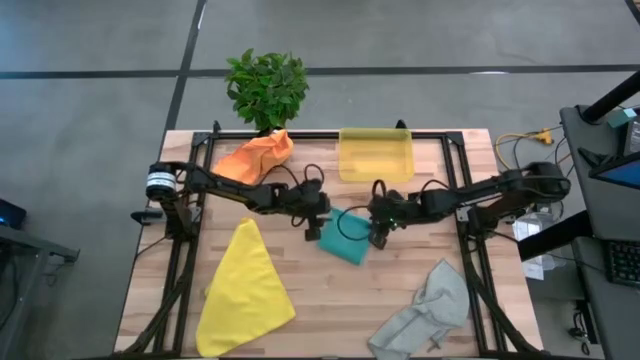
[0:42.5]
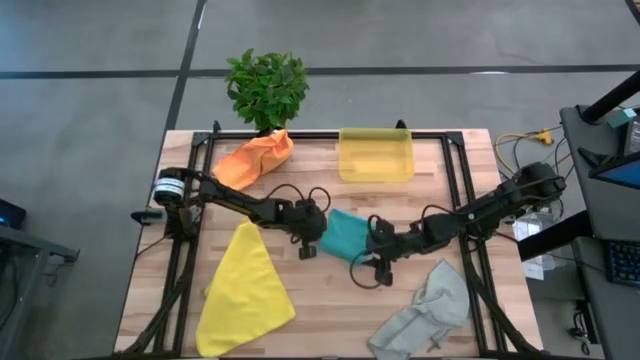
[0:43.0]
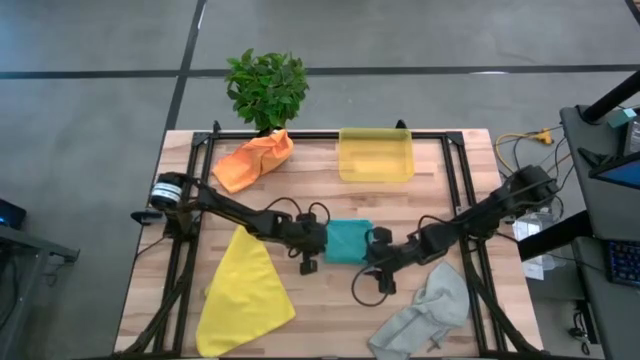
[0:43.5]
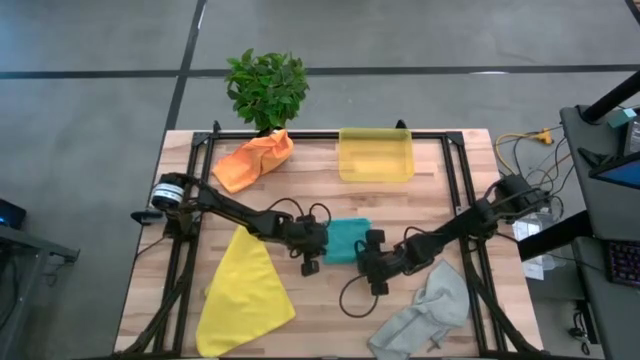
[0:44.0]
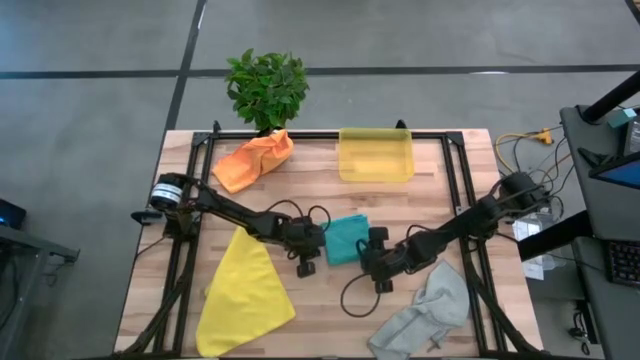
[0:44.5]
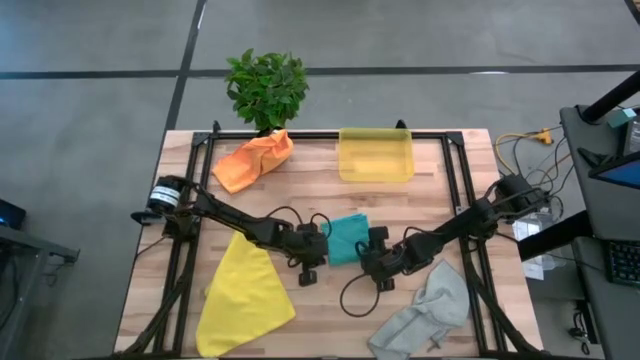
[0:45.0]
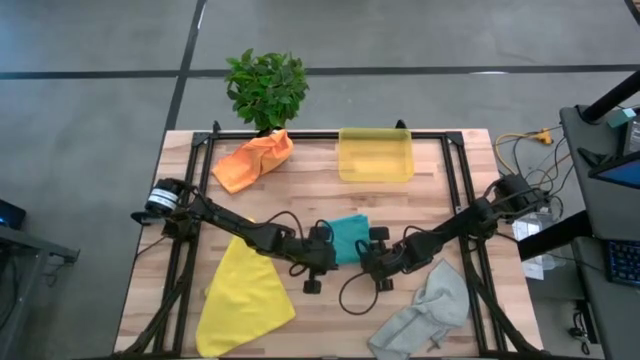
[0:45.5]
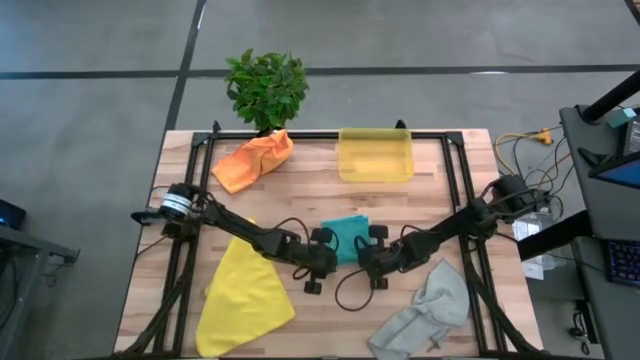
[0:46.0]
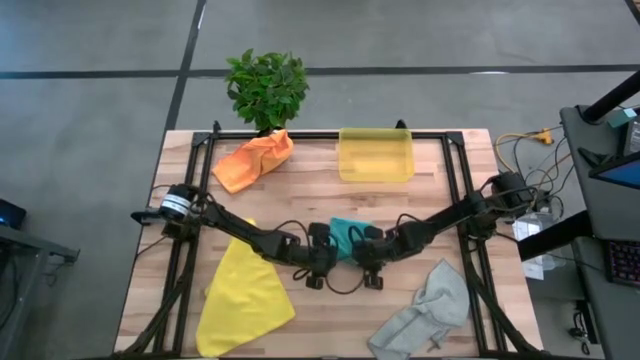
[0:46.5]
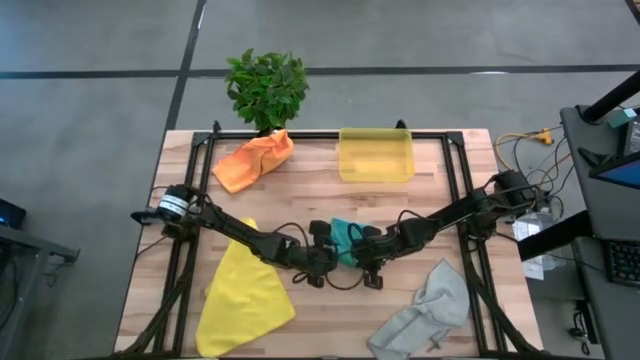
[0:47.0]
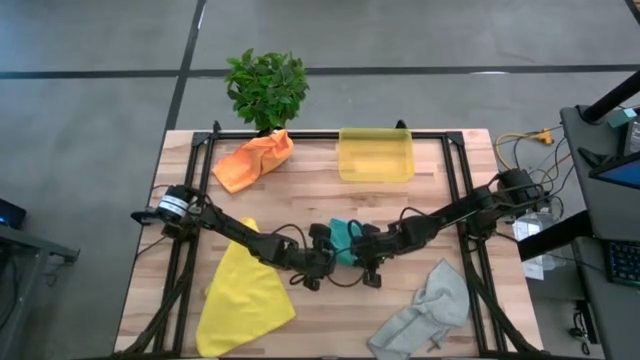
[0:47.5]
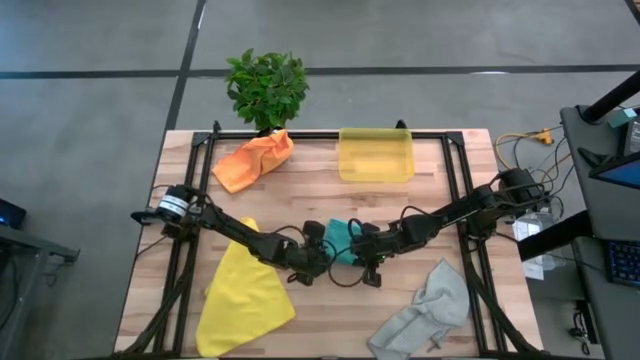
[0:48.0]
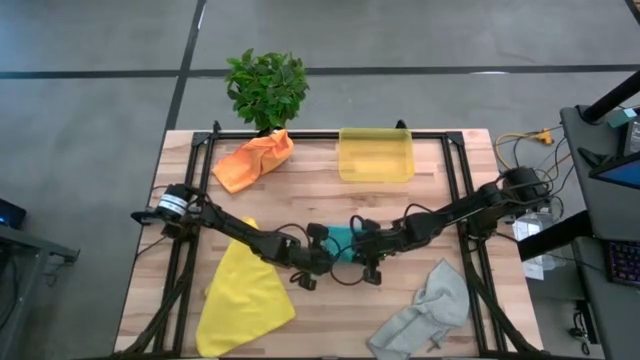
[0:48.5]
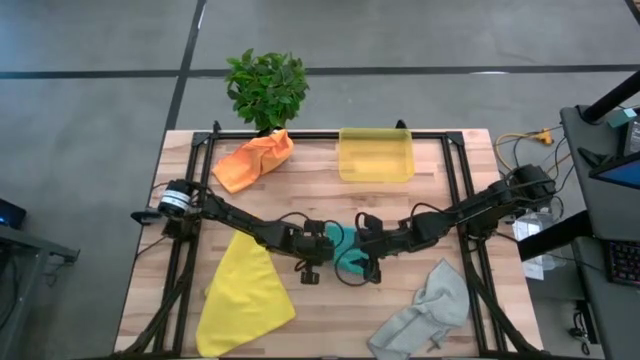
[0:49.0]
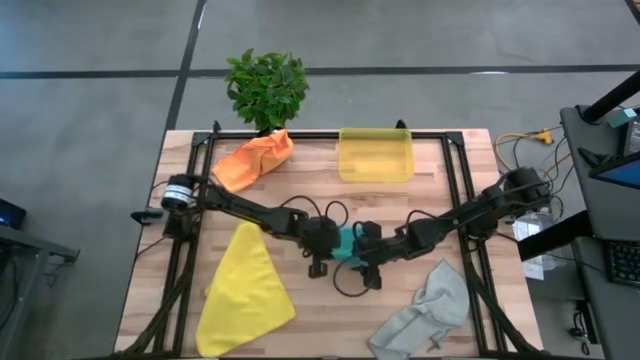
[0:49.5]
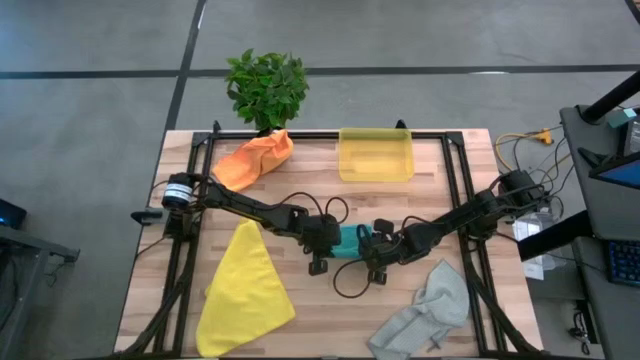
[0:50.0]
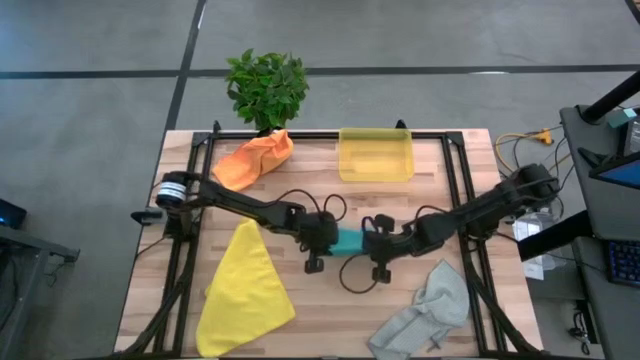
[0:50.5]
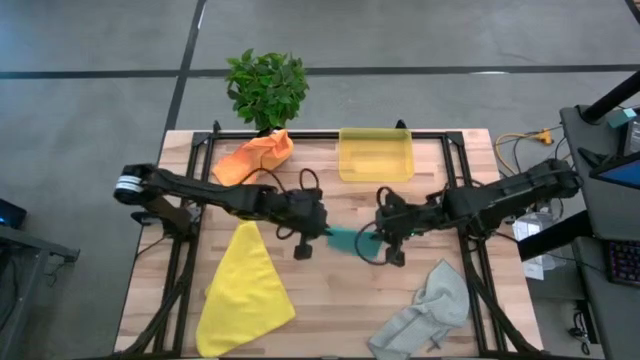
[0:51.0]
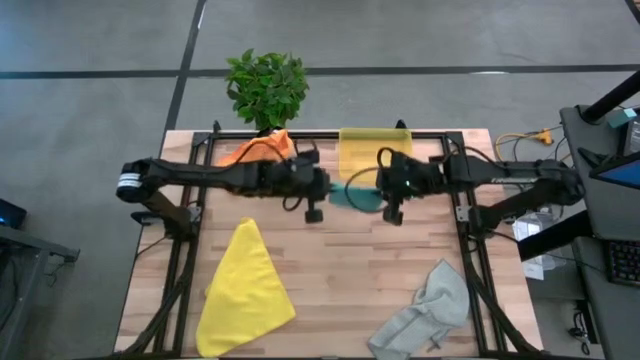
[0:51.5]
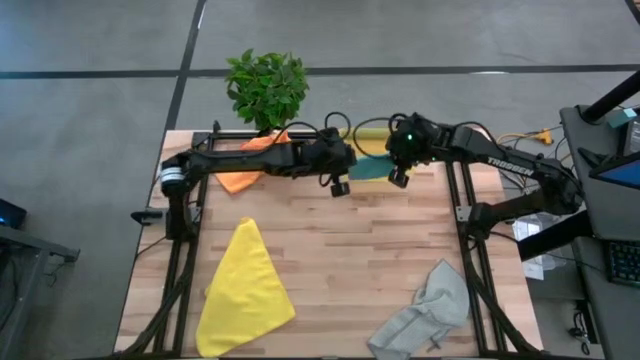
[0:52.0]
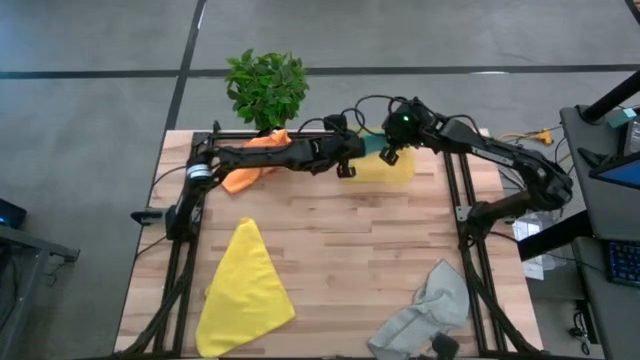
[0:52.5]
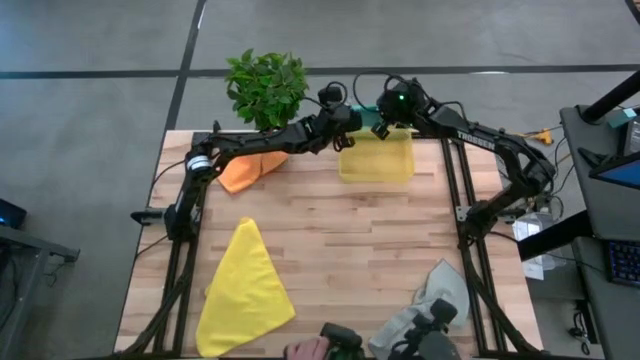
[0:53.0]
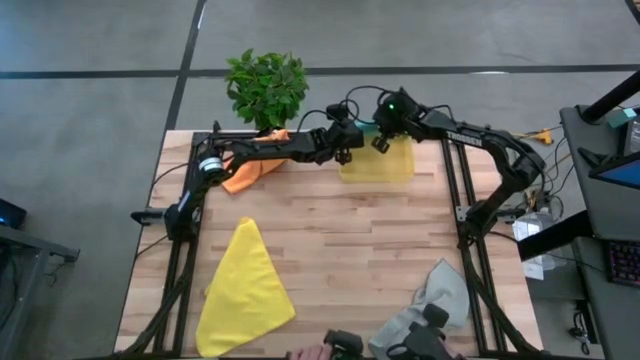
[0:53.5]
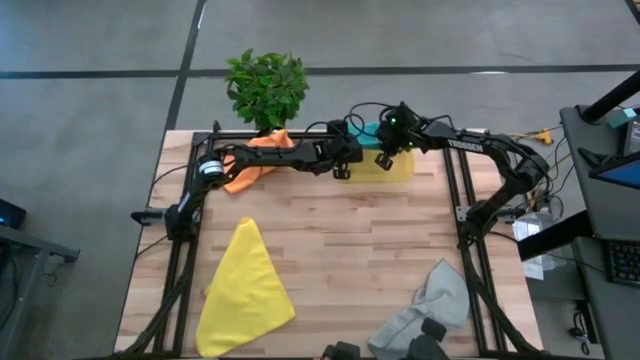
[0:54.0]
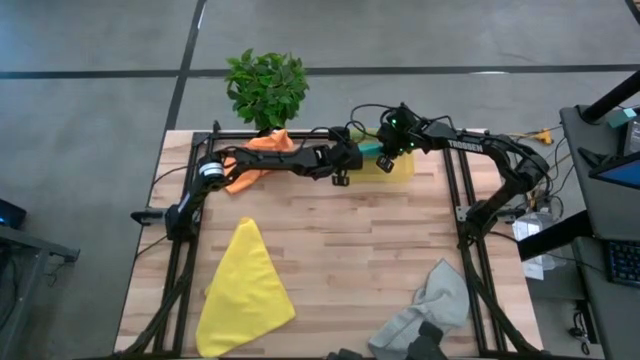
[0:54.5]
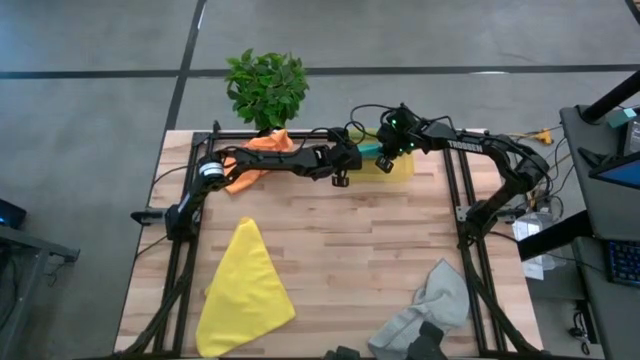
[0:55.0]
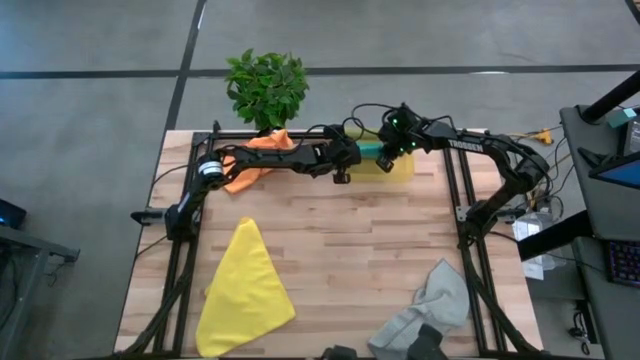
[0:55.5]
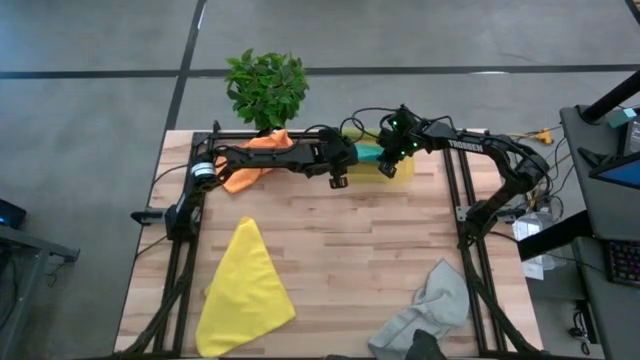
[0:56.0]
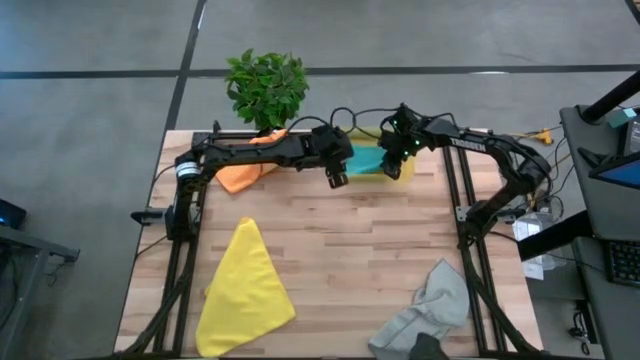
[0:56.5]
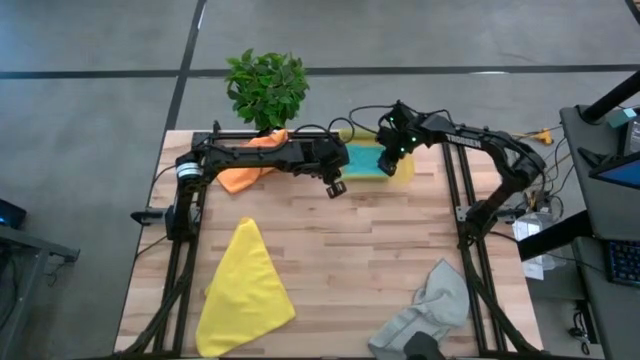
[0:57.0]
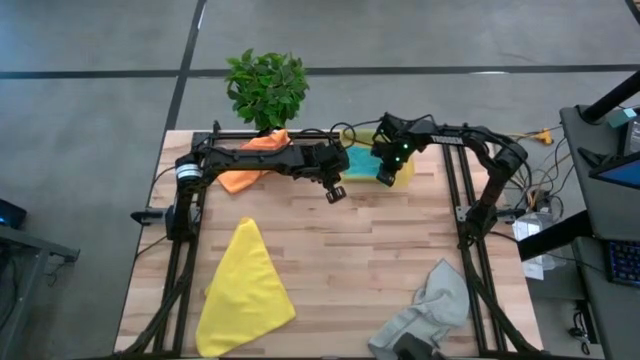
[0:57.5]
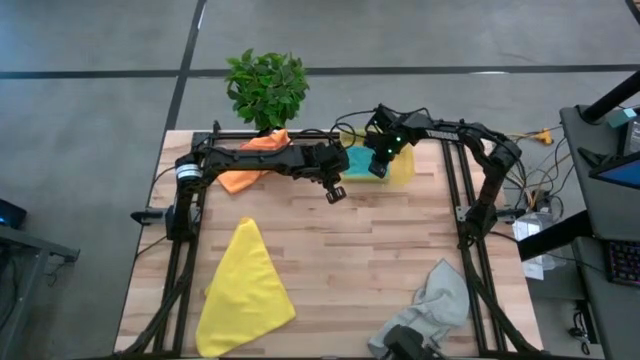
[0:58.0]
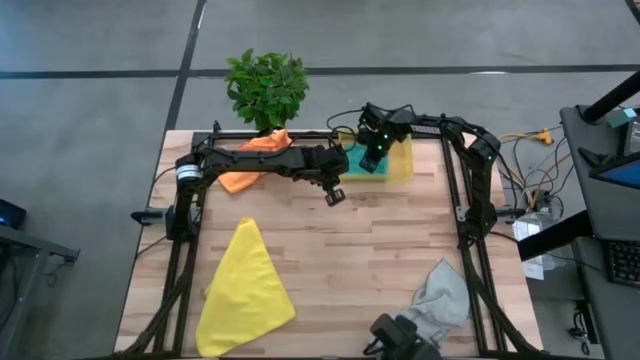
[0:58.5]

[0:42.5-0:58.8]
Task: Fold microfiber towels
Put the folded blue microfiber towel into the yellow bin
